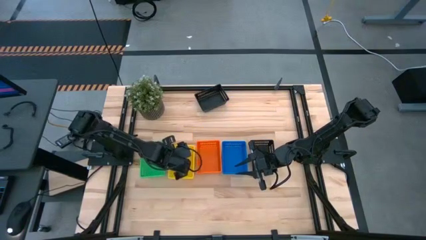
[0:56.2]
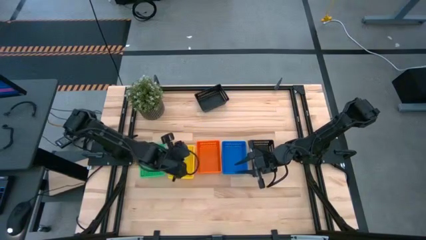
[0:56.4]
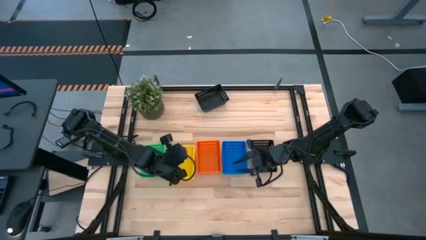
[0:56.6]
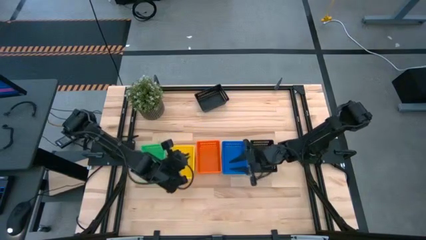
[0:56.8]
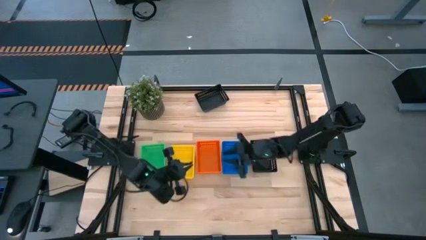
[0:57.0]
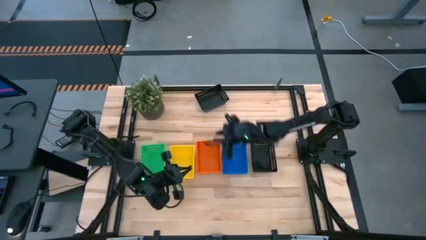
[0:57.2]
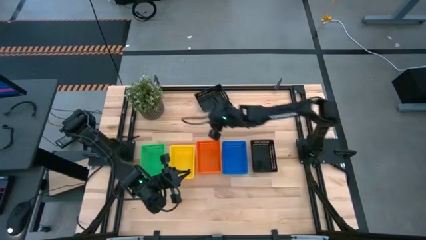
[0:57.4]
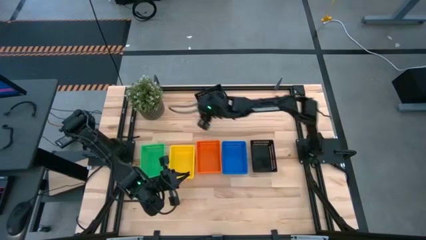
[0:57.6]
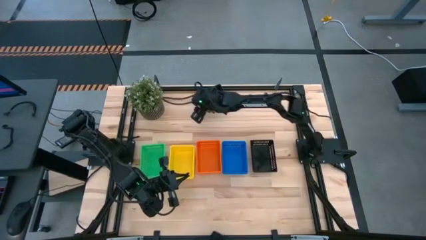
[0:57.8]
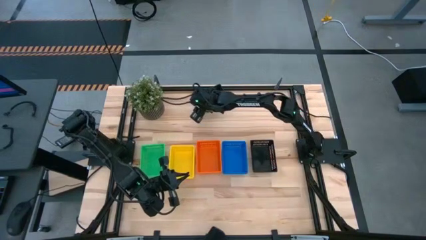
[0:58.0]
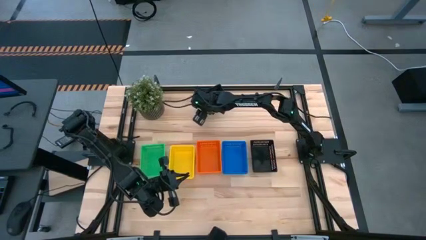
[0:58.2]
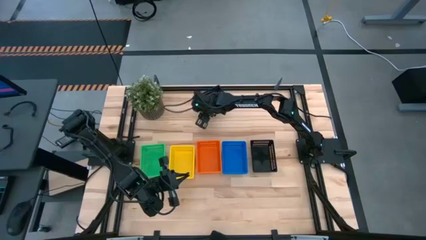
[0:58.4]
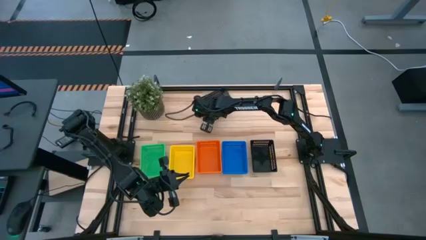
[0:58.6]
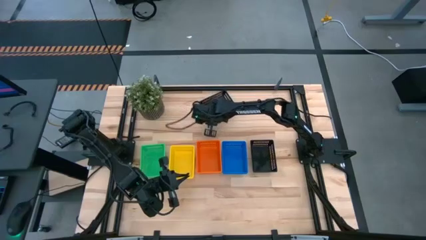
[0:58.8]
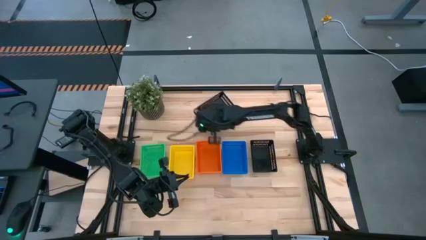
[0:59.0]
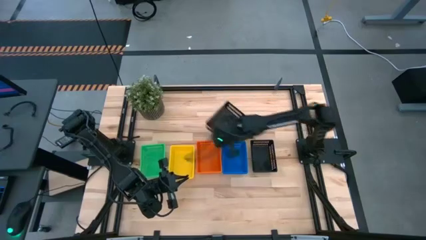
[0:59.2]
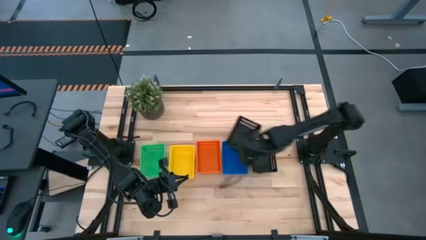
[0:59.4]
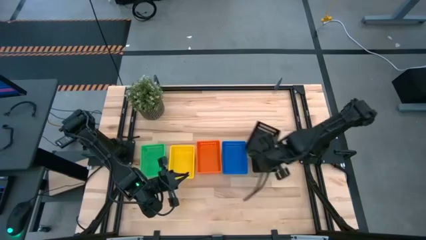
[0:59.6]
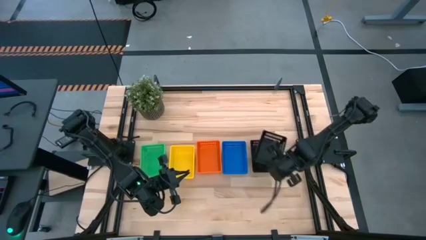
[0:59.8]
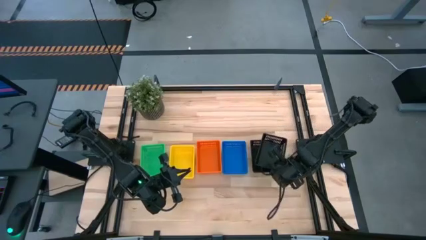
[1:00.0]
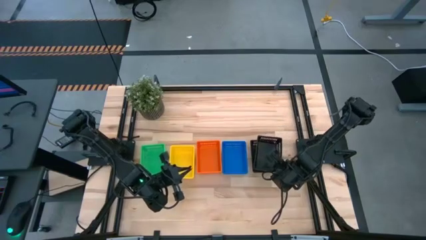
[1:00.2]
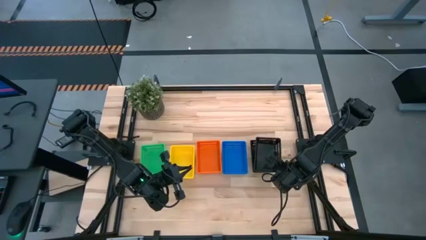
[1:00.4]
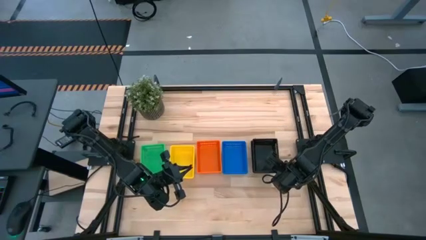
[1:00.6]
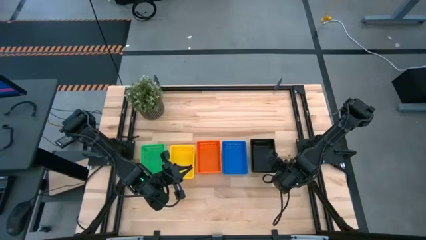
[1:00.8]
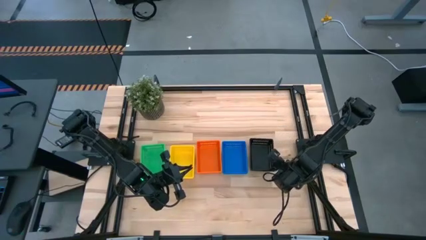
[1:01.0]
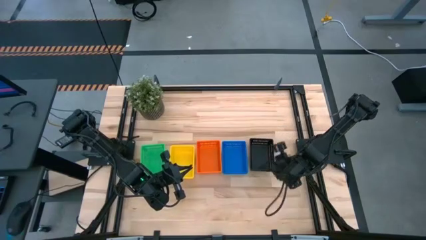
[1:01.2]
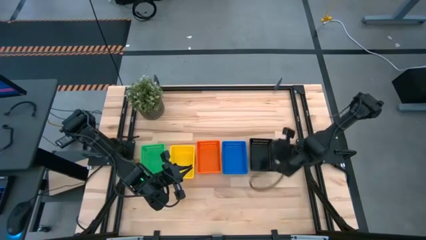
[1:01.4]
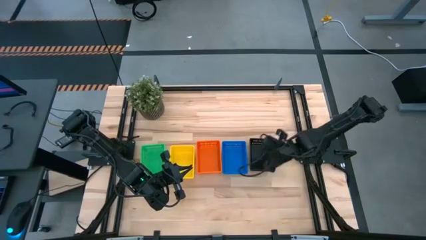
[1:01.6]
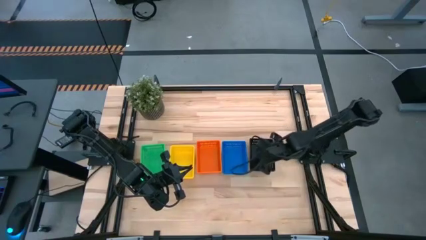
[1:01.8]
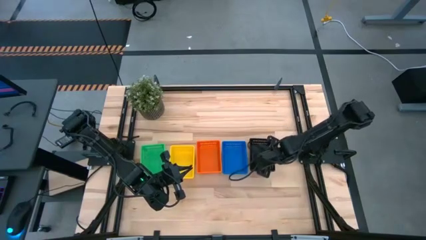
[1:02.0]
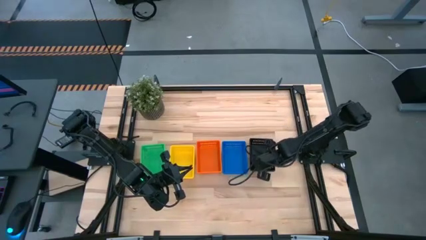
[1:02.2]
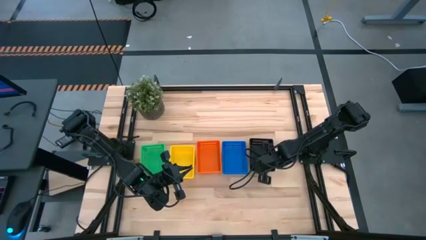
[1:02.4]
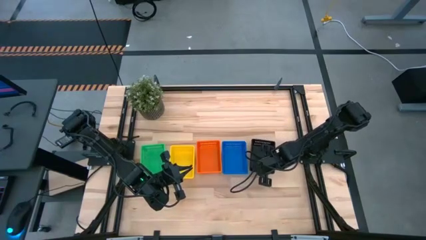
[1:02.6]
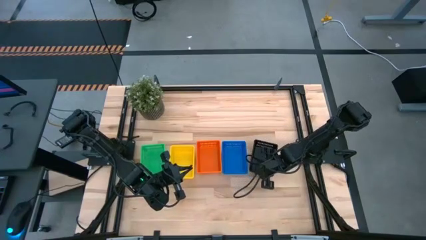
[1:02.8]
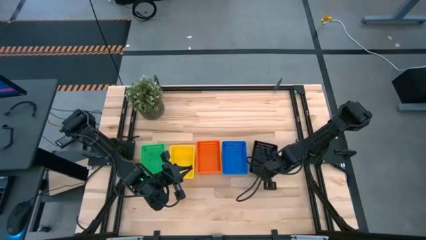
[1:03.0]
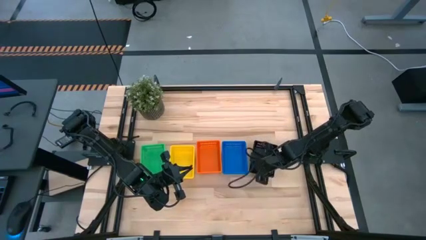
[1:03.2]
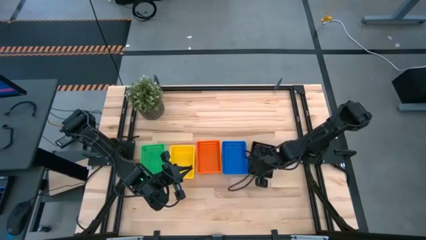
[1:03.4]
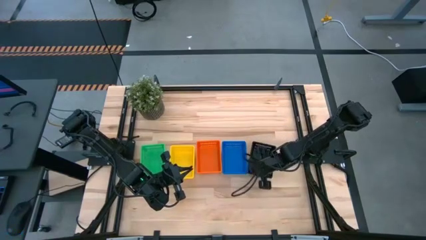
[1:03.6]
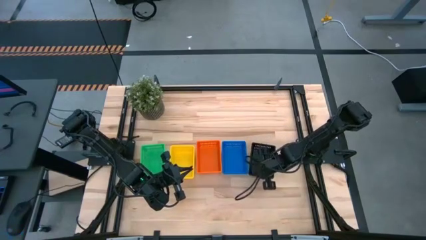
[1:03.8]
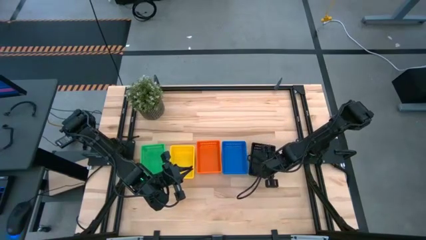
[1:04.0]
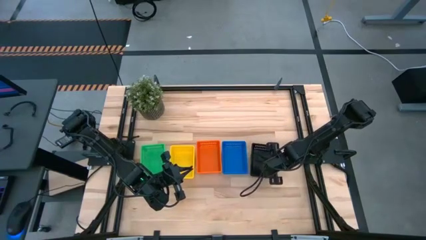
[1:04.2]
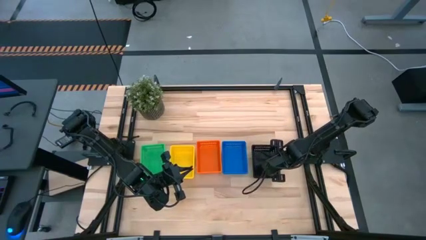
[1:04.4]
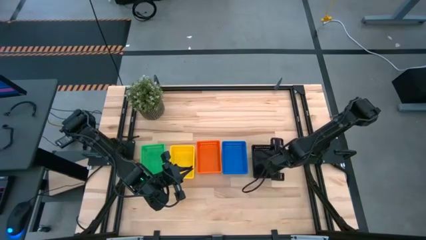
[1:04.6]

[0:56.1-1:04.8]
Stack the top black bin on top of the bottom black bin

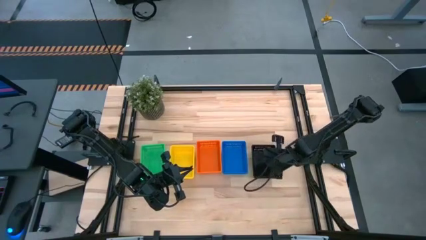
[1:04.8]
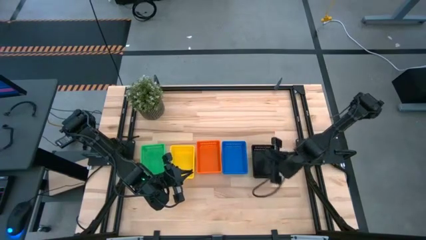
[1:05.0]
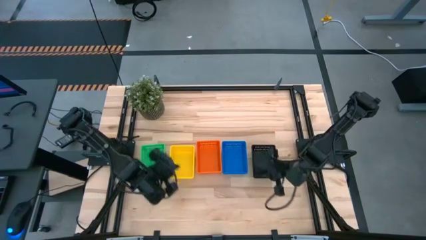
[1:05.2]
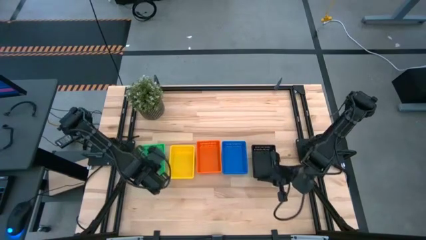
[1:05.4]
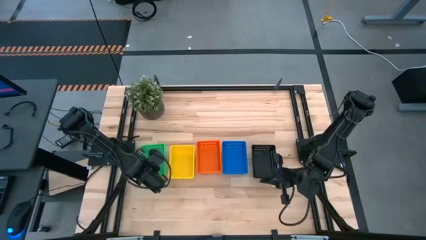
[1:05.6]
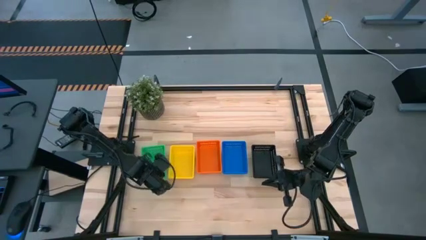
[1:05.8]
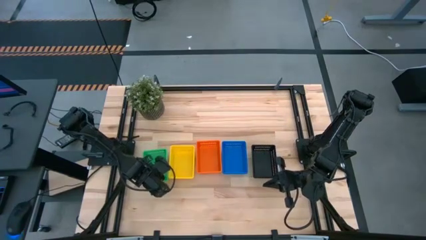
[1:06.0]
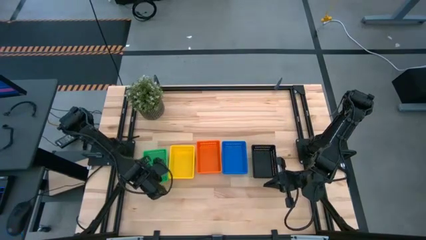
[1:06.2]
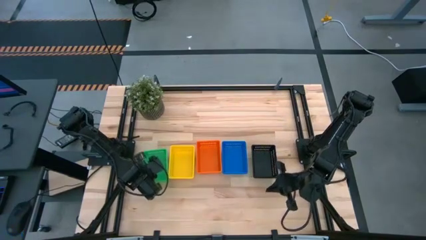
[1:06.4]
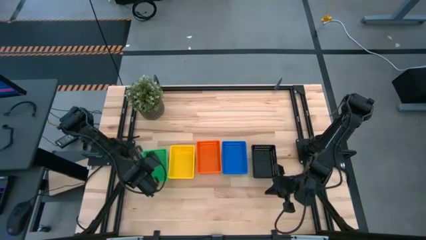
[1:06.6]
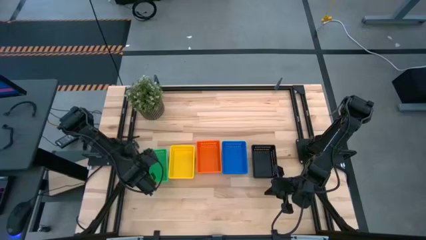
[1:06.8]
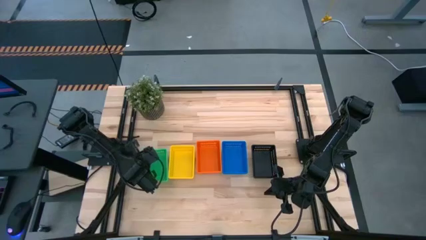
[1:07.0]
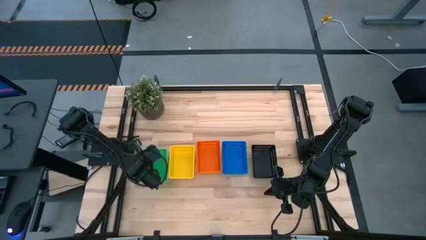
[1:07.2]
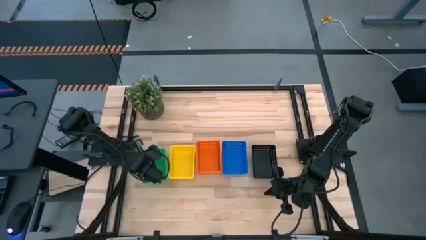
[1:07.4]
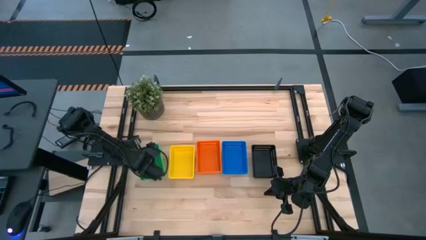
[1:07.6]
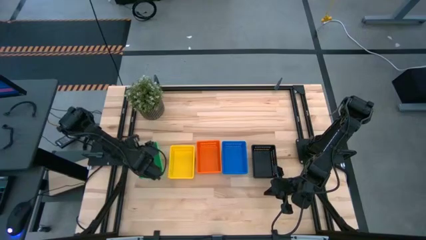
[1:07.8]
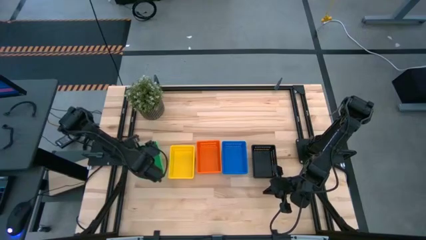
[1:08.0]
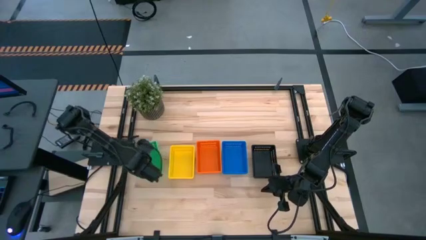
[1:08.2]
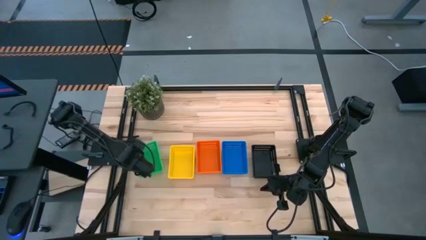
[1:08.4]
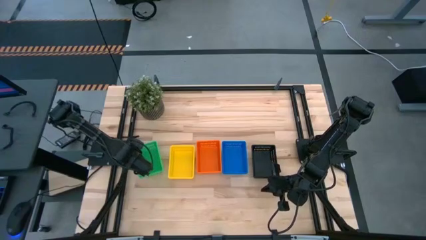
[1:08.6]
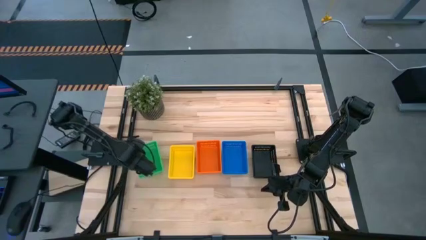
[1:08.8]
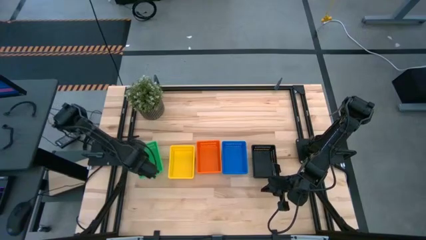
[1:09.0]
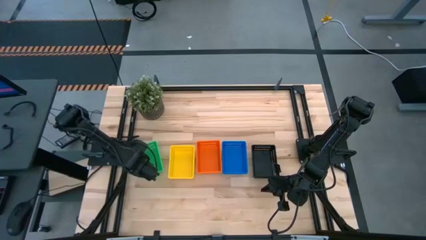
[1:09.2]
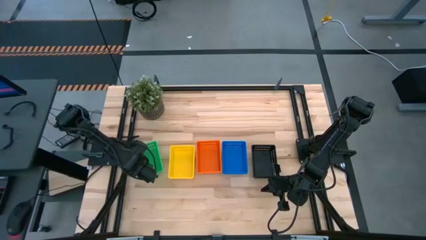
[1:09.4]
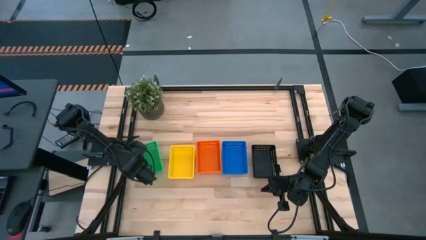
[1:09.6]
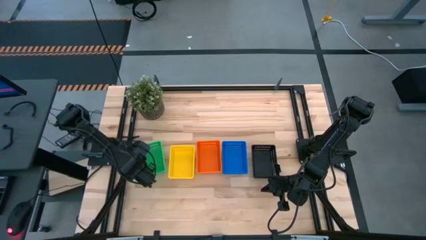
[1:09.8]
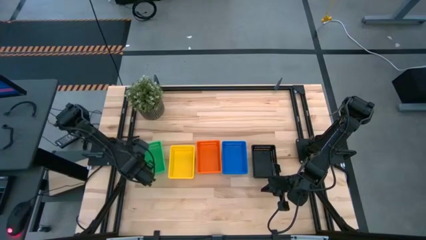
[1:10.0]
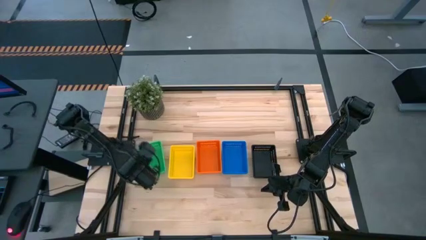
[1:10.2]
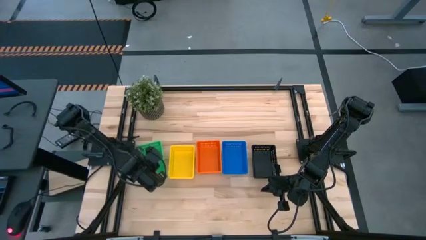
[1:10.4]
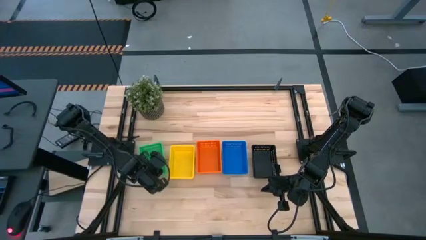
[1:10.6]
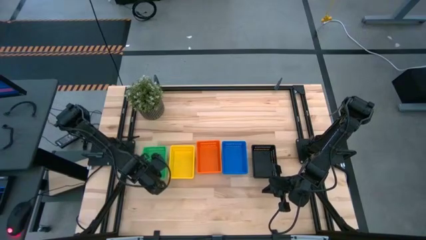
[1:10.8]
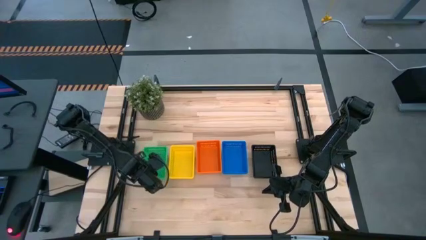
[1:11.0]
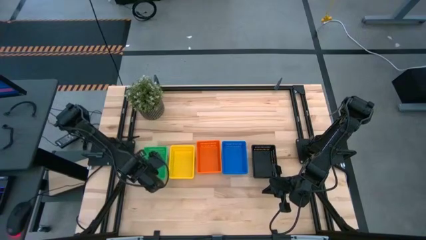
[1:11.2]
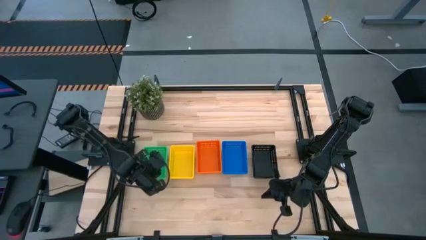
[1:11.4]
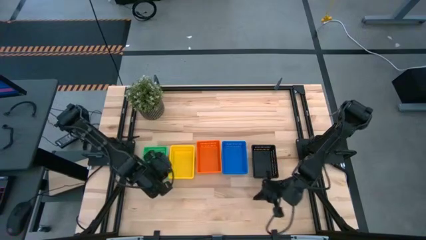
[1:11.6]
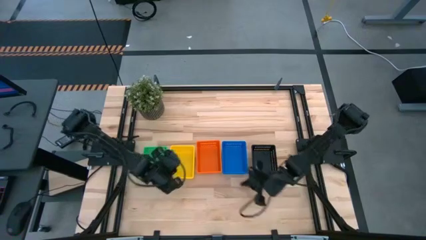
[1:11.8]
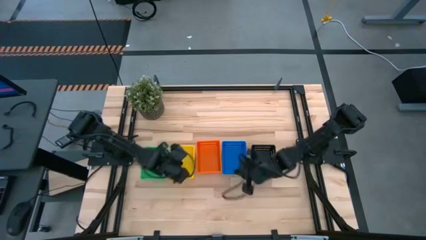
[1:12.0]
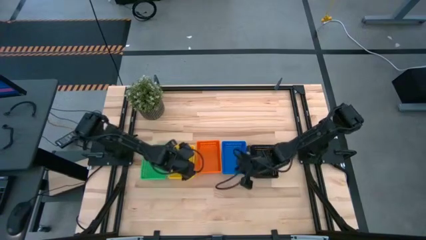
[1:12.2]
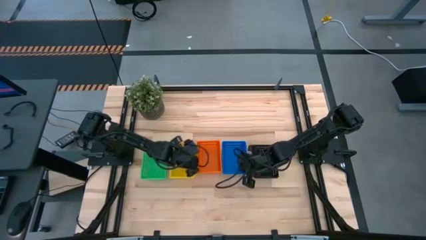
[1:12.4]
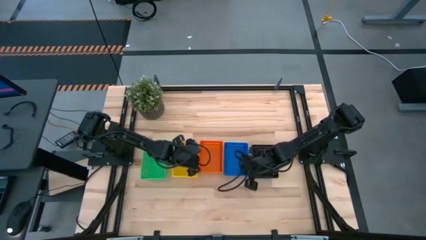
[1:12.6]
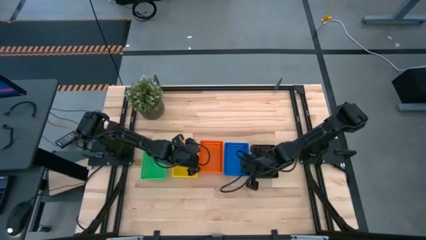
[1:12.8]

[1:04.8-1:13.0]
Adjust the stacked bins
